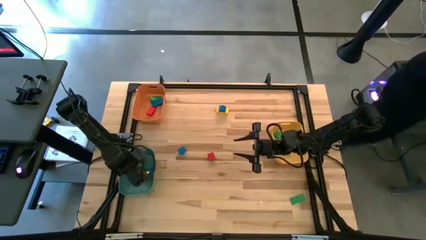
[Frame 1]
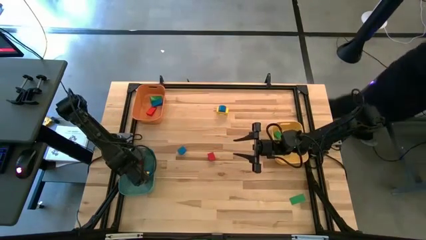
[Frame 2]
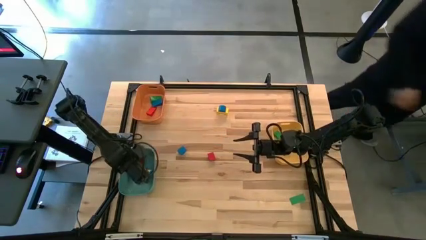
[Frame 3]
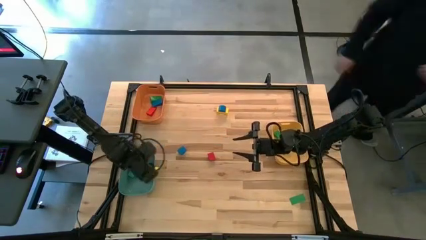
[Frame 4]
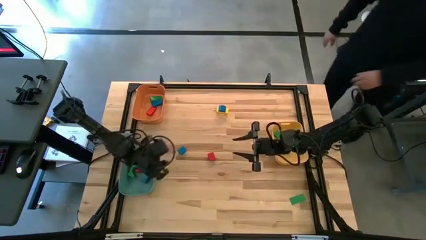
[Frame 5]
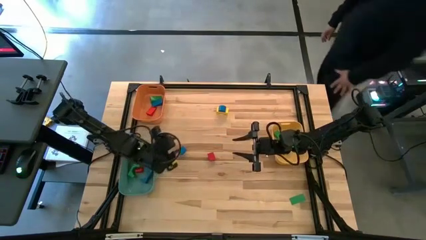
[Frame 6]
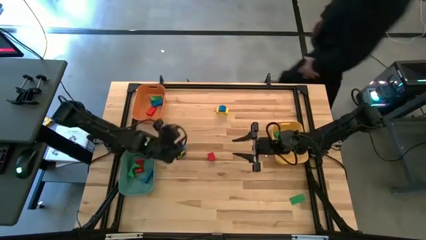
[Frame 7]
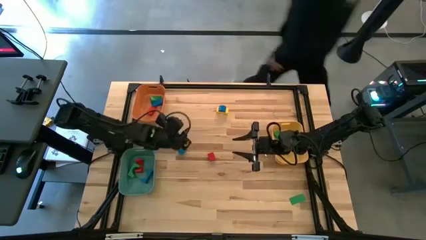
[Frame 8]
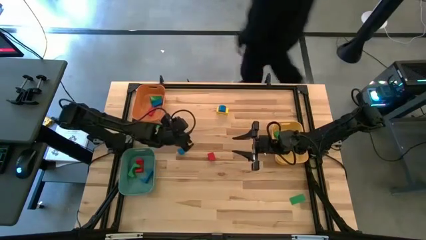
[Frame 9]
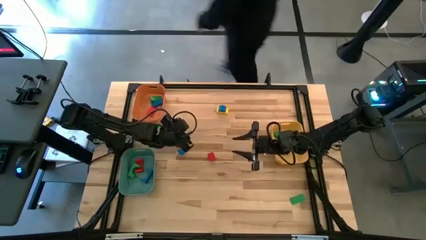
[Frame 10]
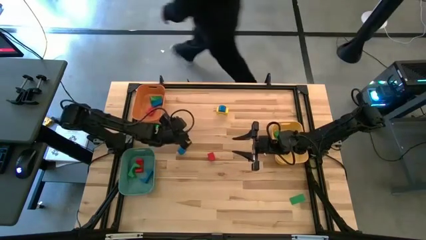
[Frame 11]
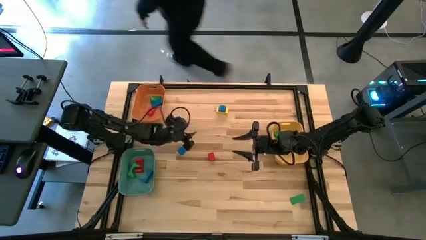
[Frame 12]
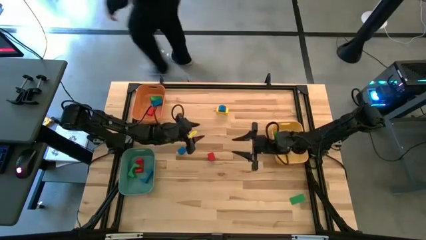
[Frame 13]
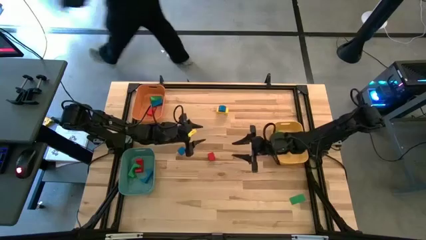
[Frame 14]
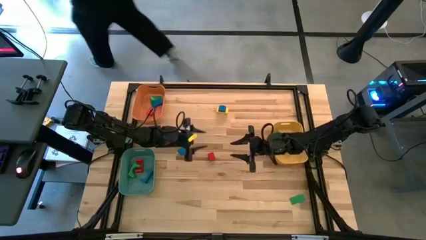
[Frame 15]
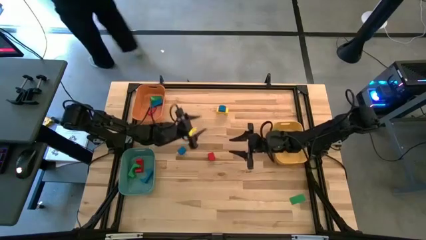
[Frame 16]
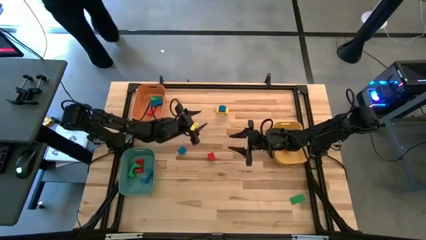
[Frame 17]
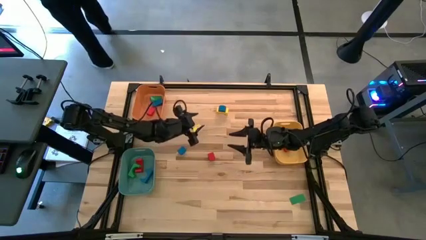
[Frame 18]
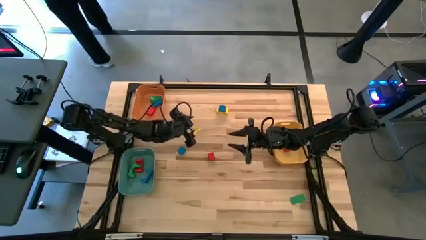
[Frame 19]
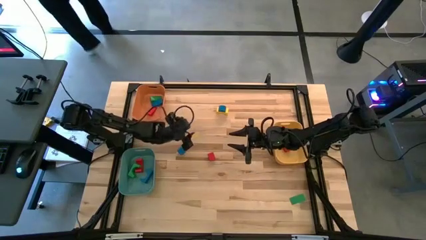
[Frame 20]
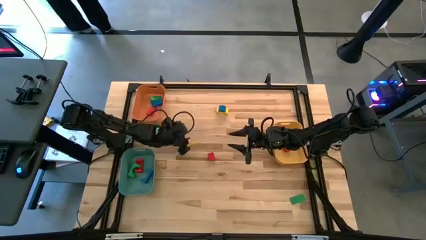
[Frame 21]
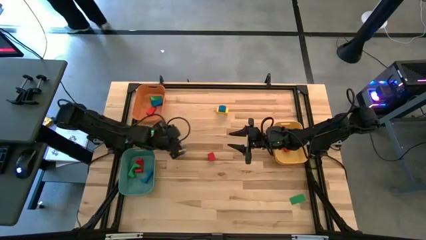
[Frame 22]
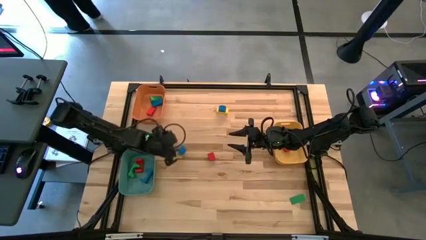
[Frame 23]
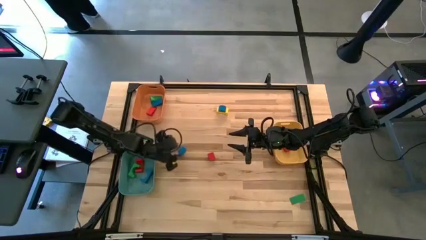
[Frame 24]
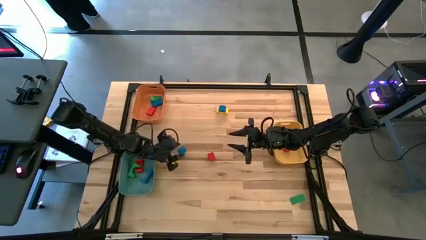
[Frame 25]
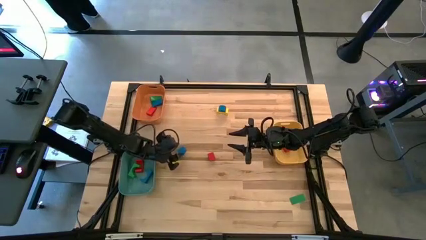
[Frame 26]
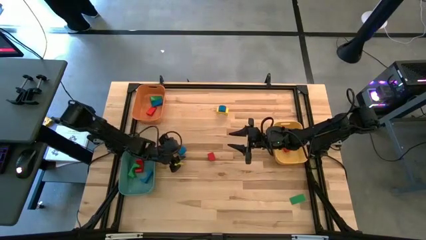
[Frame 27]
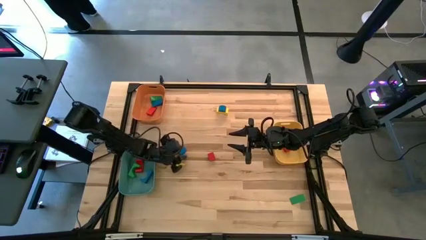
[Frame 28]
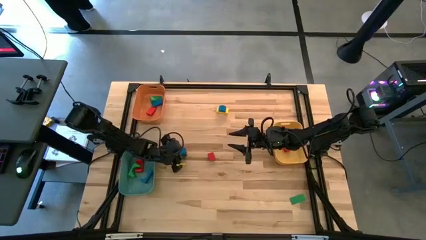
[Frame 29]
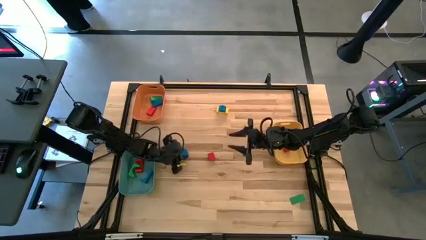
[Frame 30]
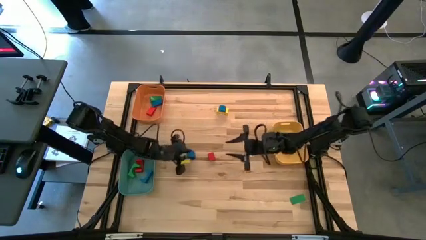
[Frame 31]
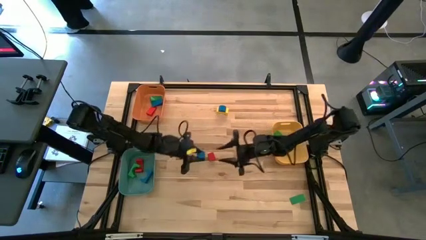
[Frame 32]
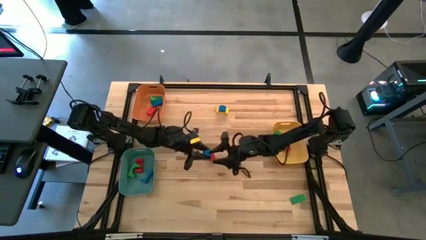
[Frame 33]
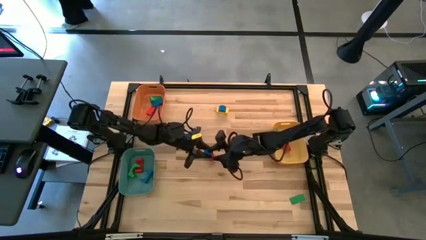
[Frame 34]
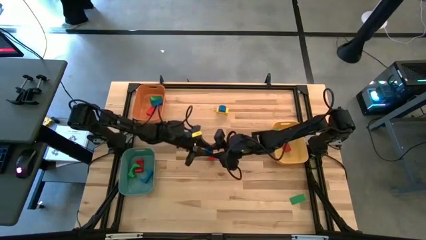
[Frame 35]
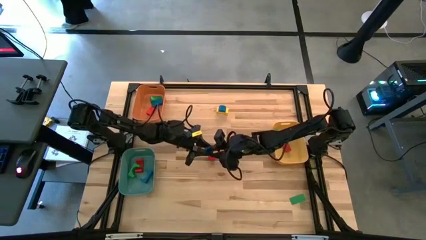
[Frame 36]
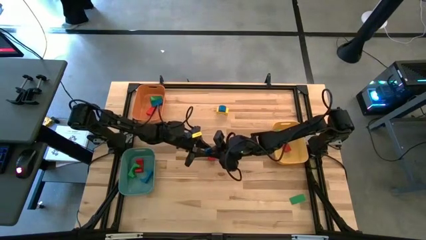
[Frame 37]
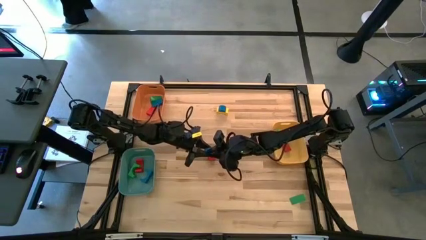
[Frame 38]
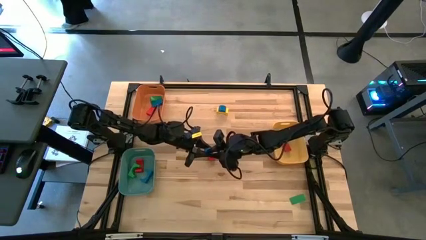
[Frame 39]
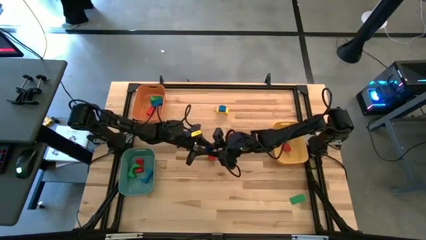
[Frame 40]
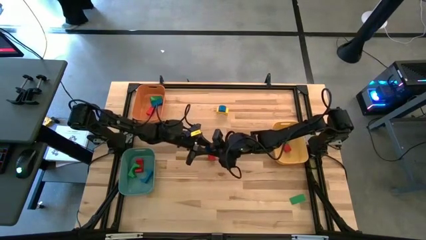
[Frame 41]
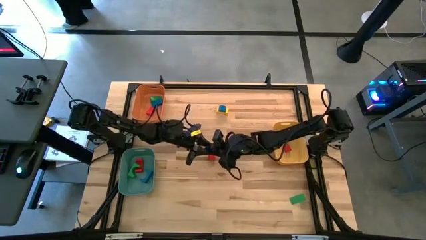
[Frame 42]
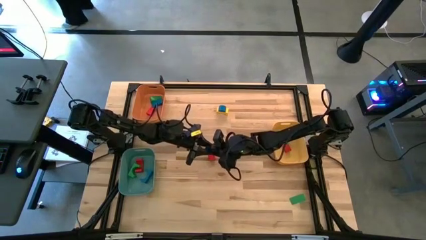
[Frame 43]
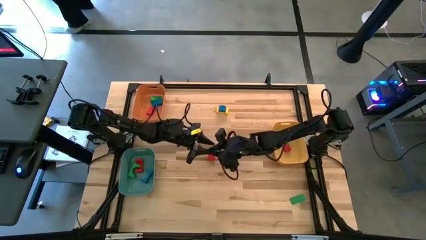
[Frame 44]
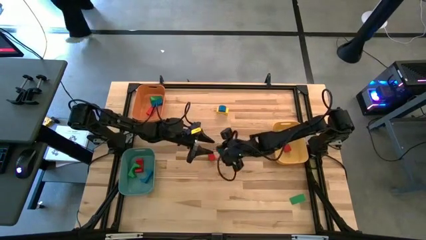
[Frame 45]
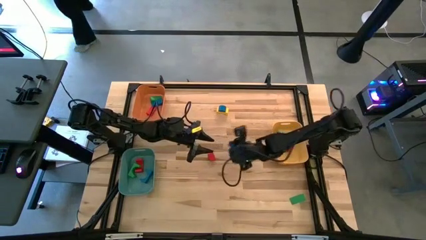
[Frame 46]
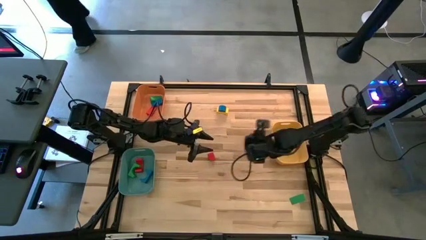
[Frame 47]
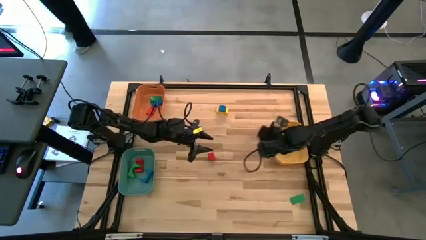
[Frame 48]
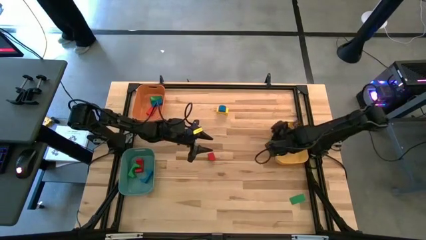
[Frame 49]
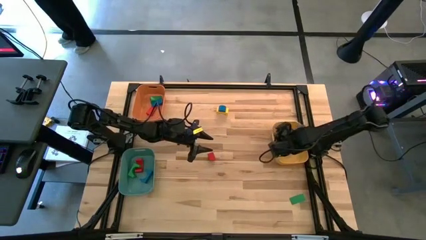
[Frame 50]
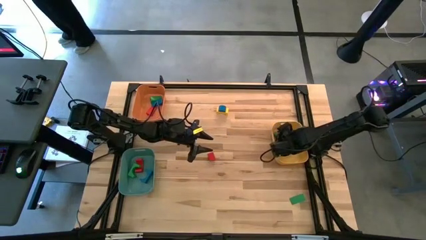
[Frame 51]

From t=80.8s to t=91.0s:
Task: Sort blocks by size
Put the blue half-circle block into the yellow bin

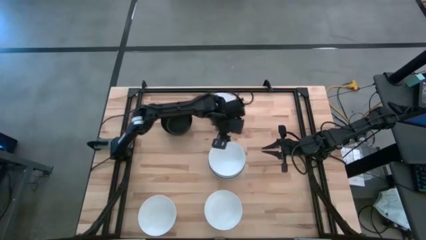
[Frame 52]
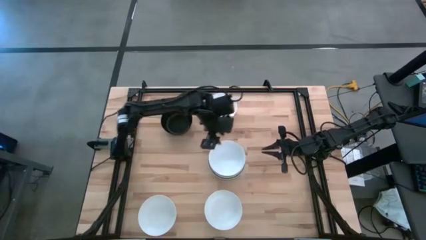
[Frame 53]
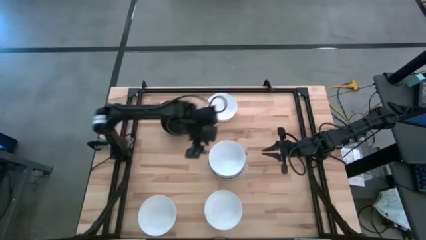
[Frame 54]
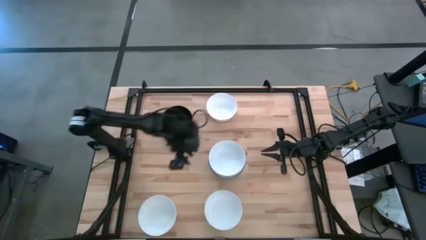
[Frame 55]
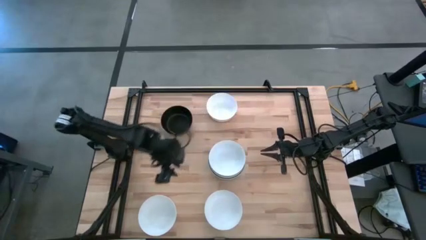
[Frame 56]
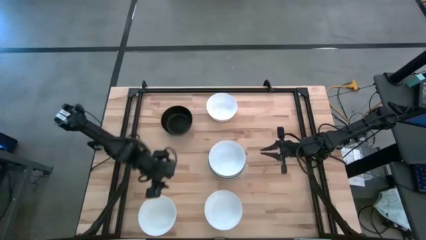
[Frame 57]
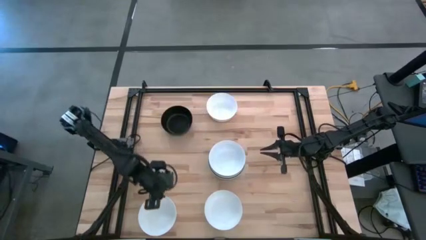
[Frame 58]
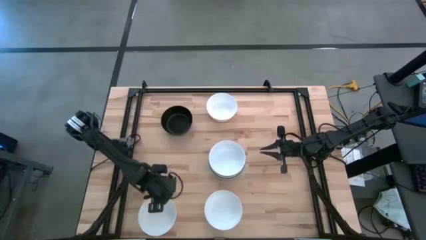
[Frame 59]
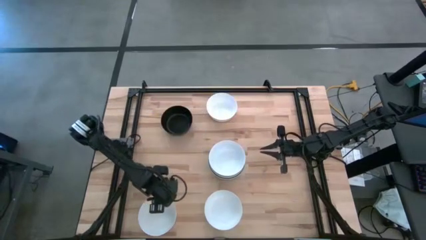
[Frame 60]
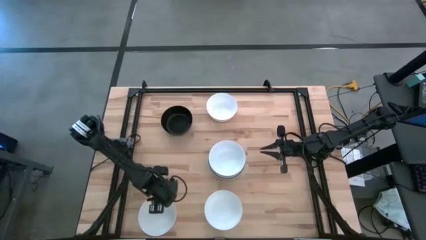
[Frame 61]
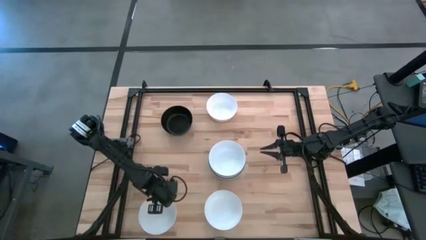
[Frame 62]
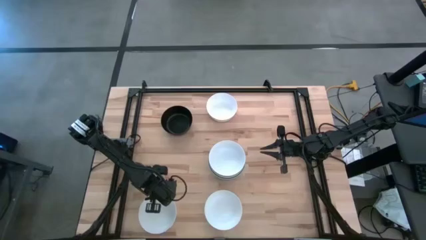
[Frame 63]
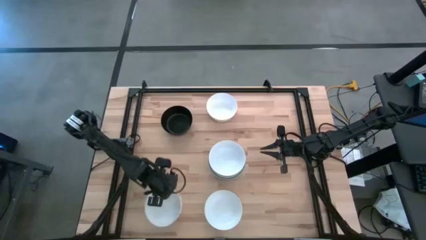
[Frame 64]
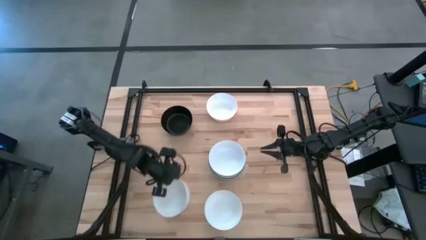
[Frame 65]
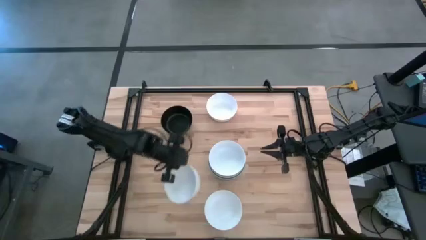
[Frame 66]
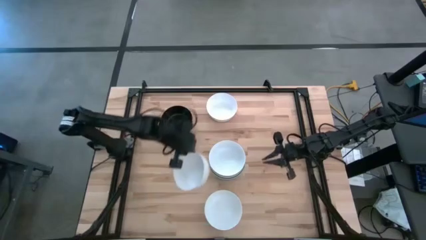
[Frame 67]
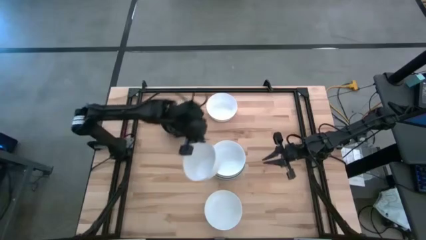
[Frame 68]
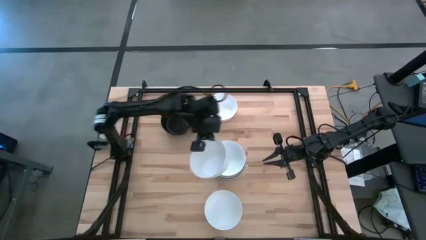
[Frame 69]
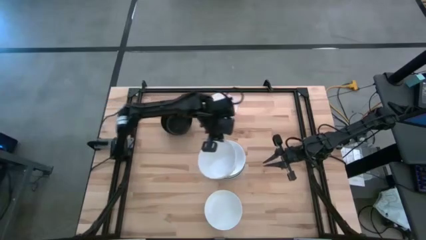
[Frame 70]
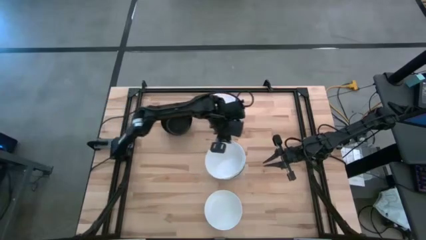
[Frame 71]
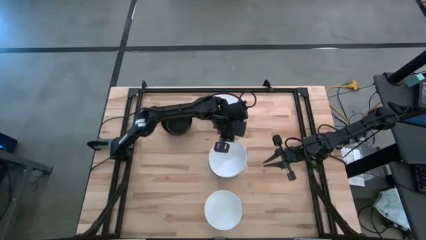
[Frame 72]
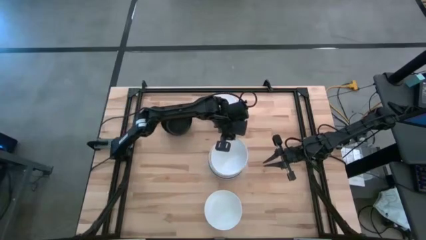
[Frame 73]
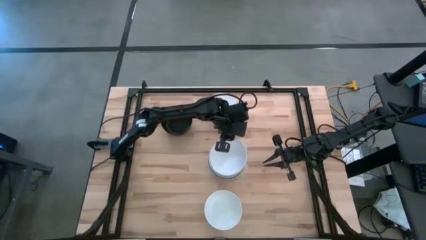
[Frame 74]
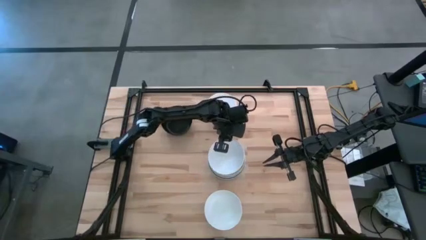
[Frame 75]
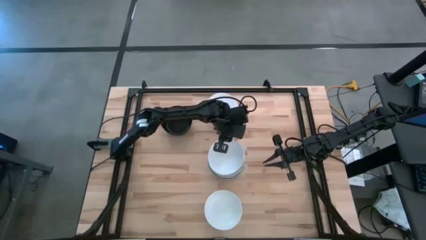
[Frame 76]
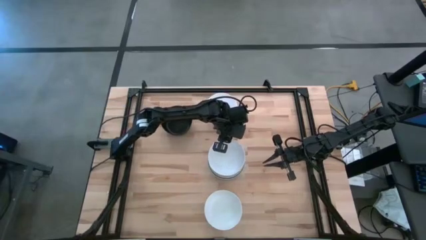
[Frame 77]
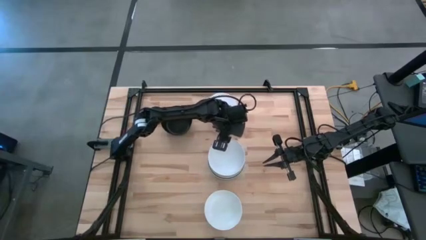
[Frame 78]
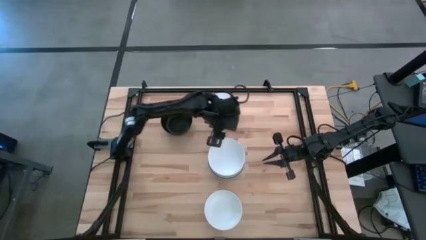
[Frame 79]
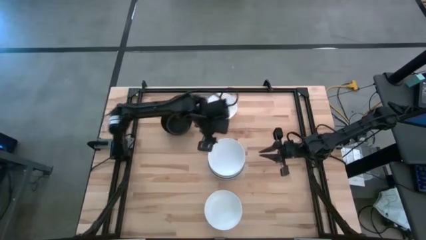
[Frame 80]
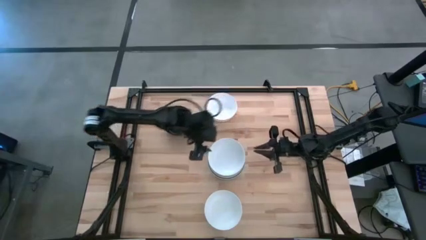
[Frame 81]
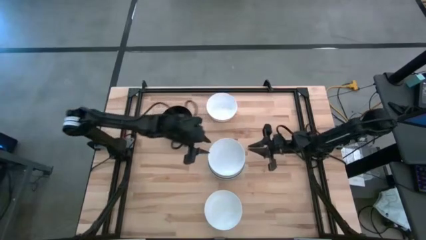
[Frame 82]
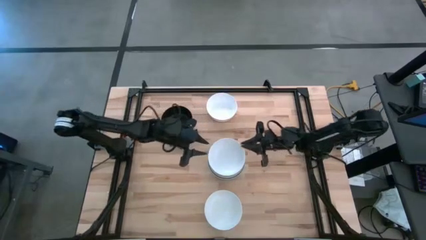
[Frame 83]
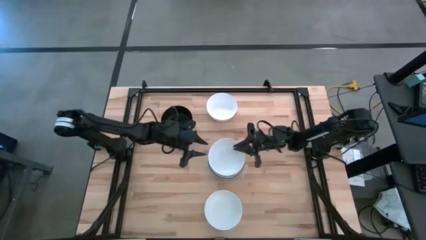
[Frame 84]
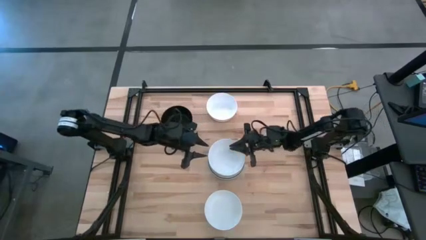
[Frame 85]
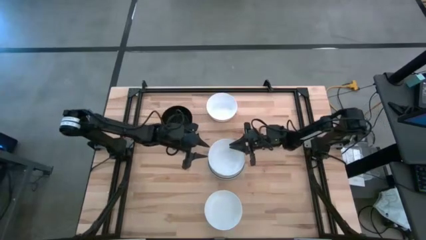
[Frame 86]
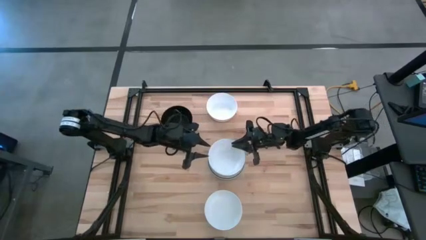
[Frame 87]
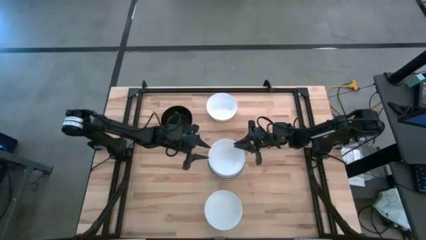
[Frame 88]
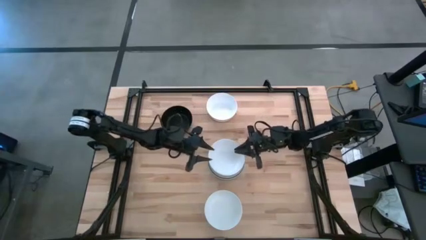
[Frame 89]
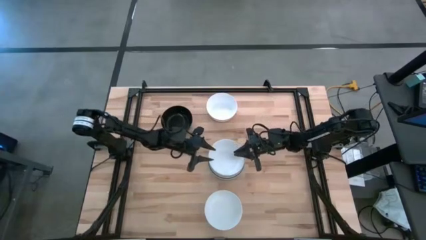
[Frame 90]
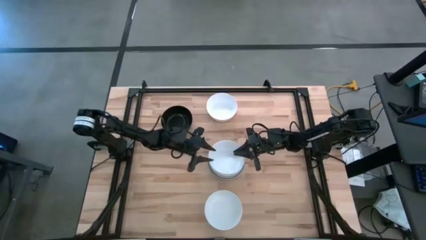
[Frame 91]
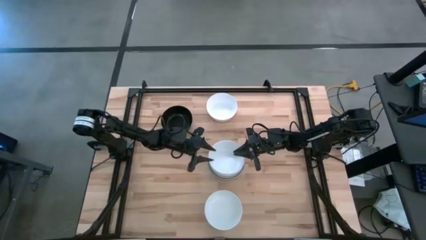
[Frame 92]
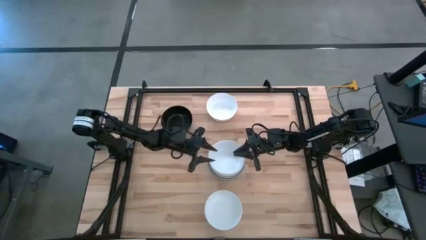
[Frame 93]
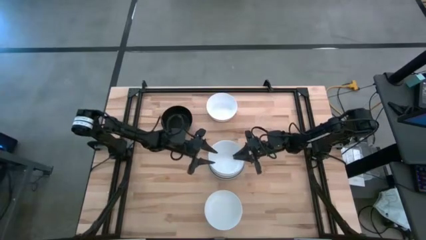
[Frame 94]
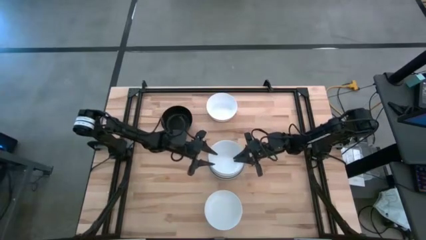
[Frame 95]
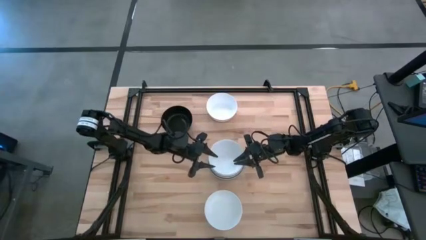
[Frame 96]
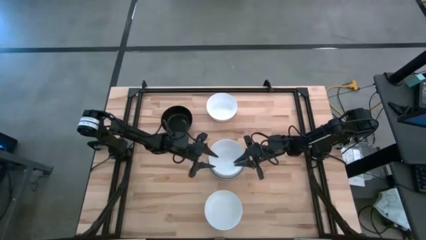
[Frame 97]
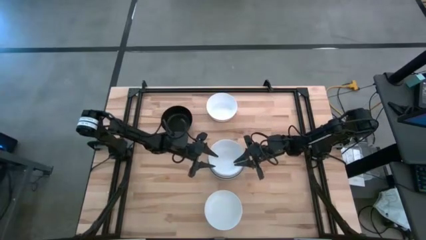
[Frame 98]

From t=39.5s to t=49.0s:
Task: Nest bowls inside each other
Stack the white bowl on top of the white bowl
